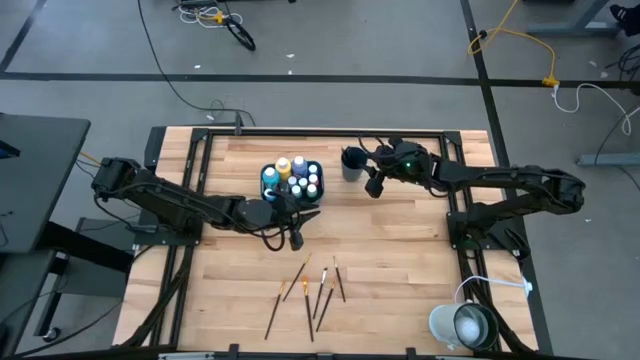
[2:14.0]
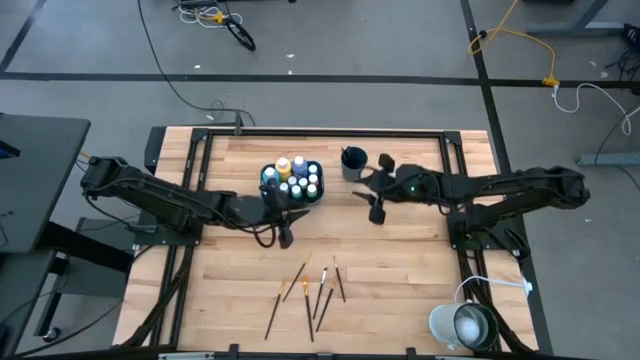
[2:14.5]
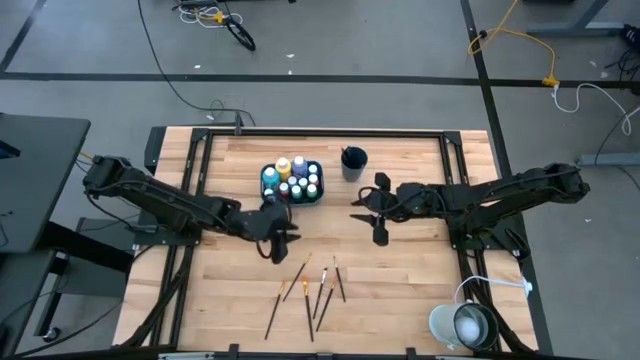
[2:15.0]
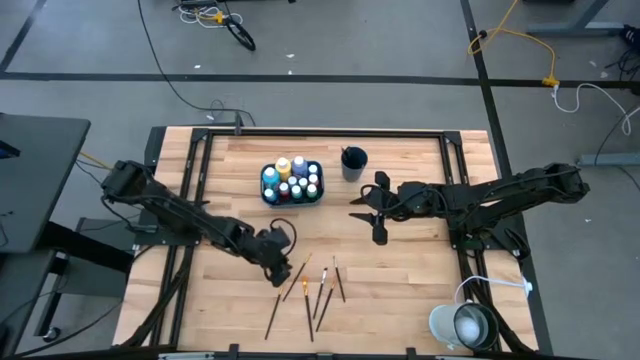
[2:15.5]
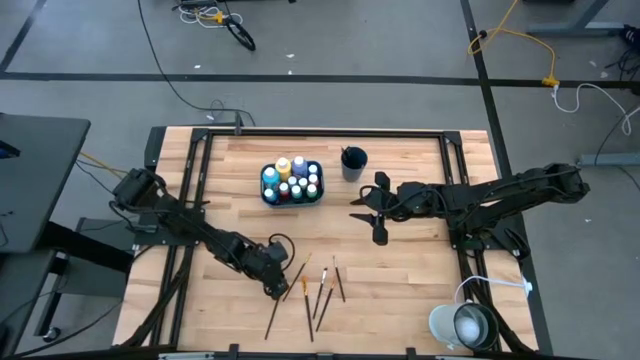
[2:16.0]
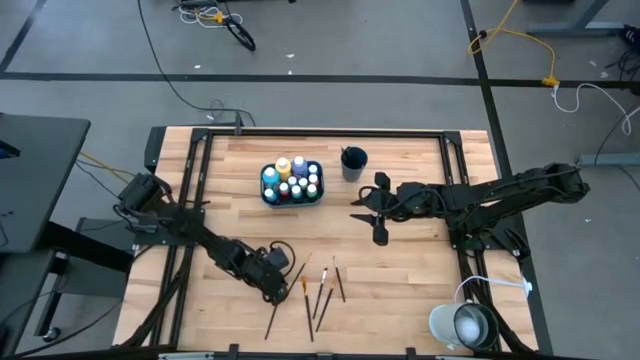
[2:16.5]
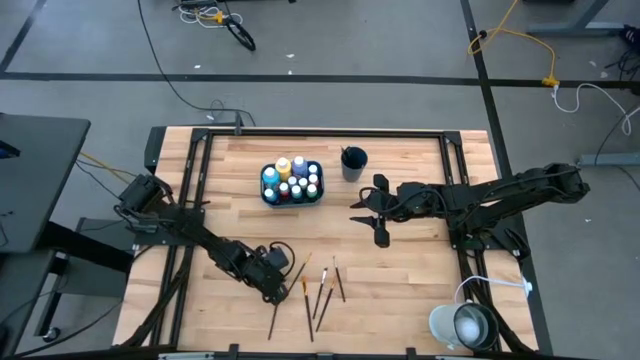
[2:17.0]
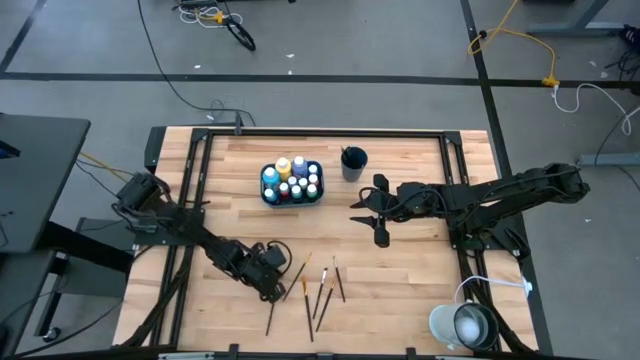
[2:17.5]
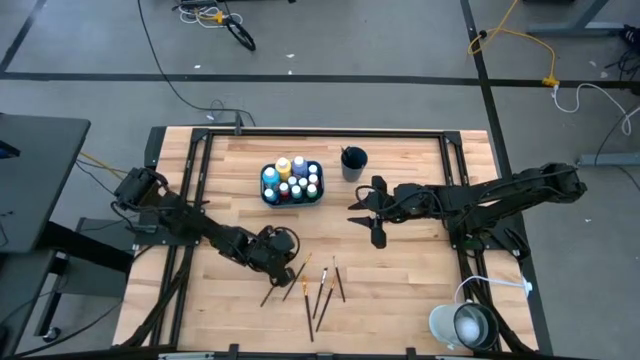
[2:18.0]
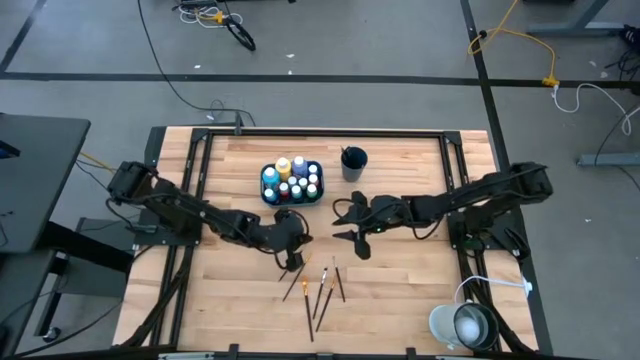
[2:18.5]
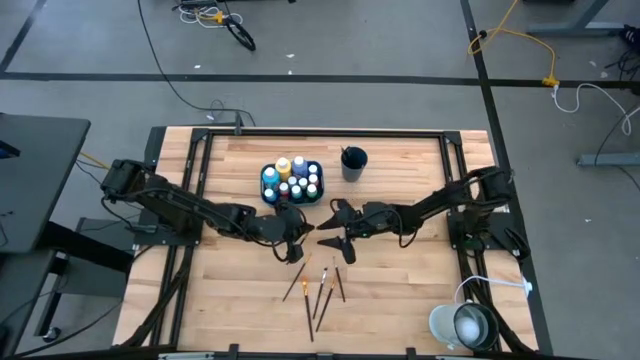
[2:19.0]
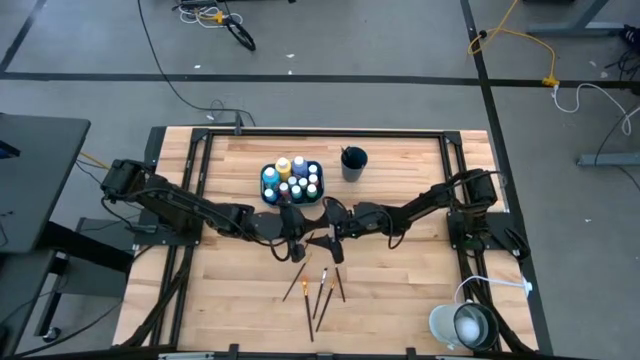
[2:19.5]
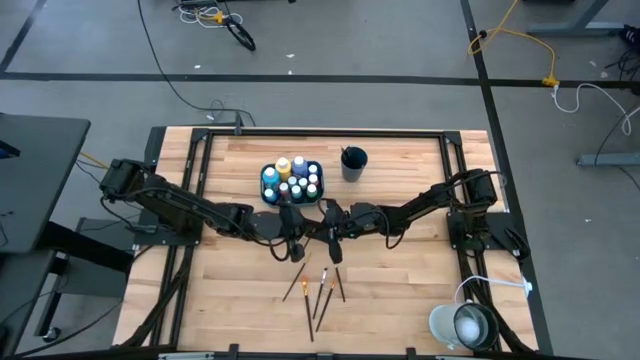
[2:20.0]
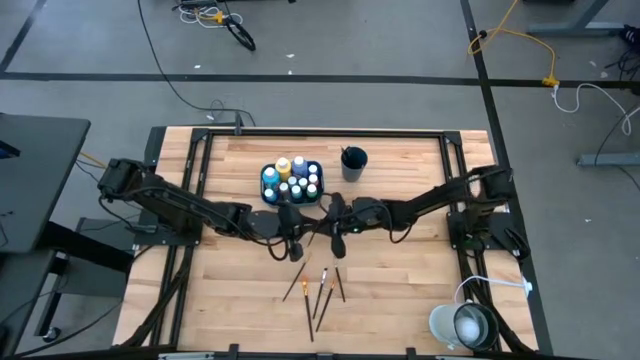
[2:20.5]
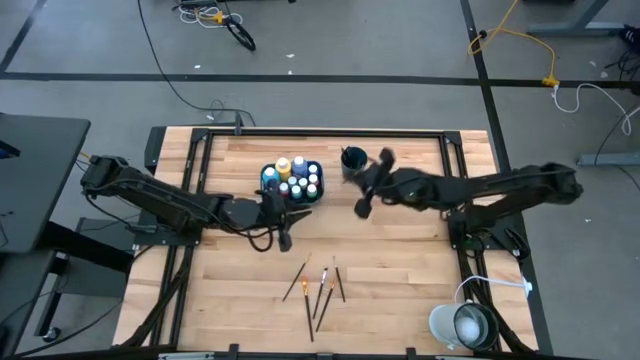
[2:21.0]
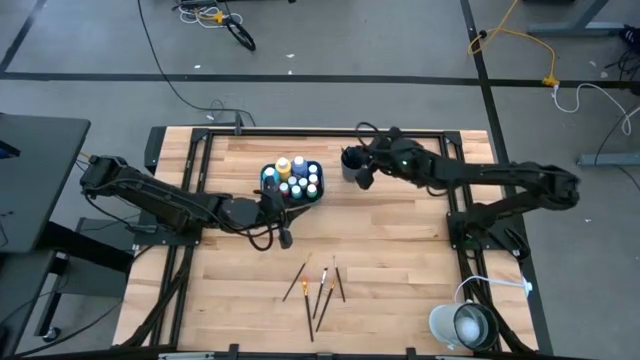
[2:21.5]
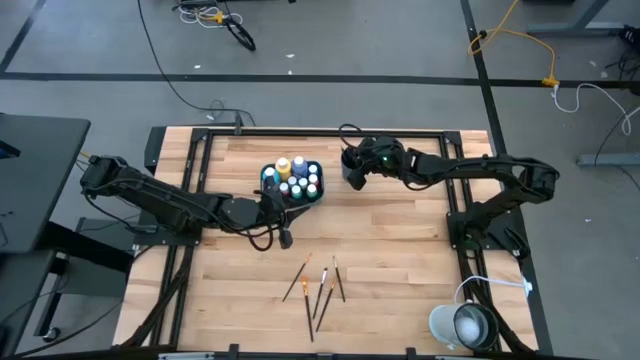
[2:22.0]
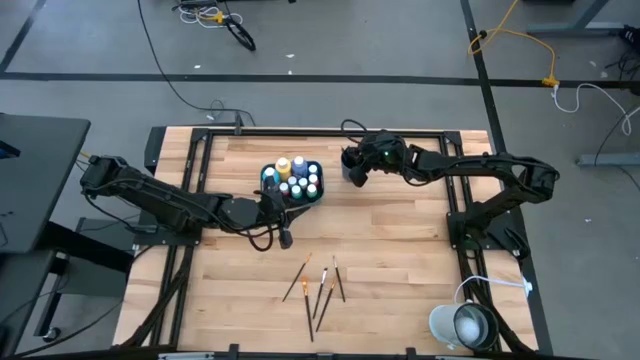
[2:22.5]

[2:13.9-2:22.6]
Task: Pick & Place Paint Supplies
Put the gold paint brush into the blue cup

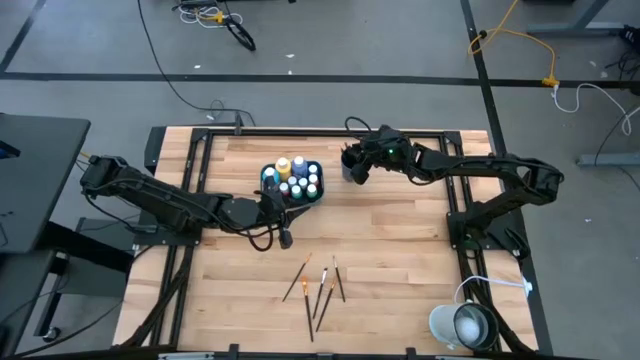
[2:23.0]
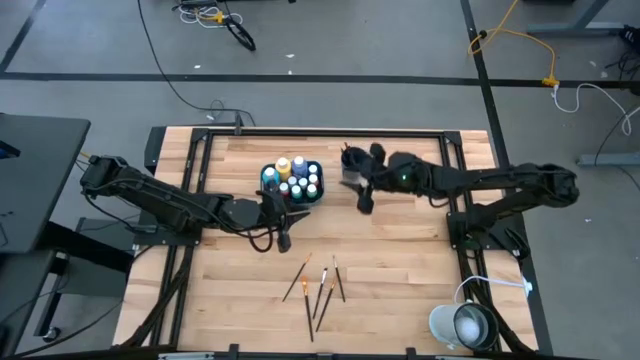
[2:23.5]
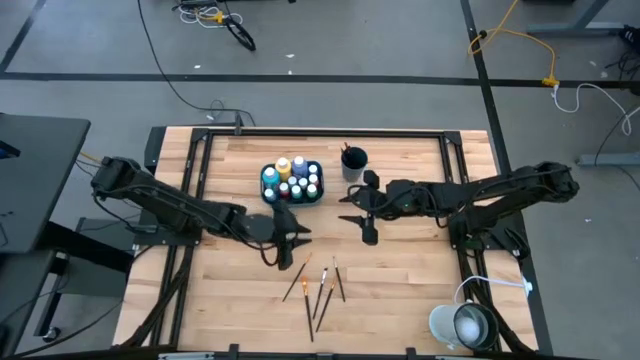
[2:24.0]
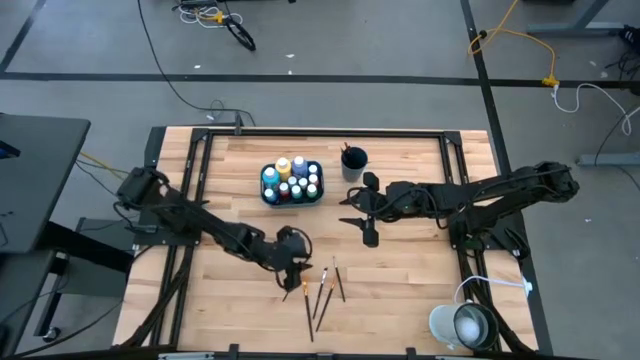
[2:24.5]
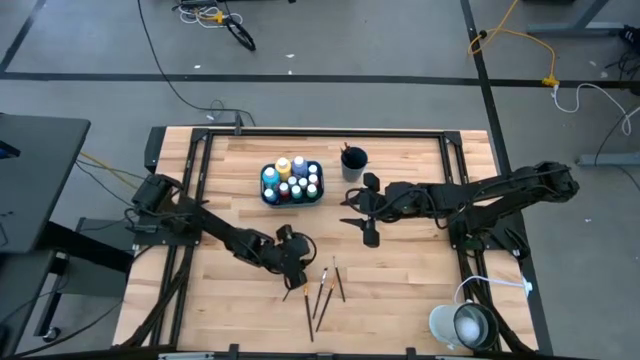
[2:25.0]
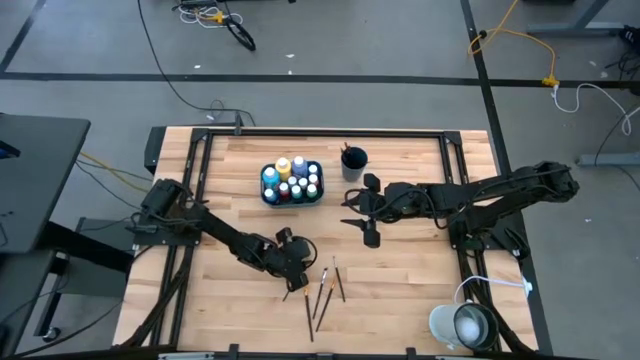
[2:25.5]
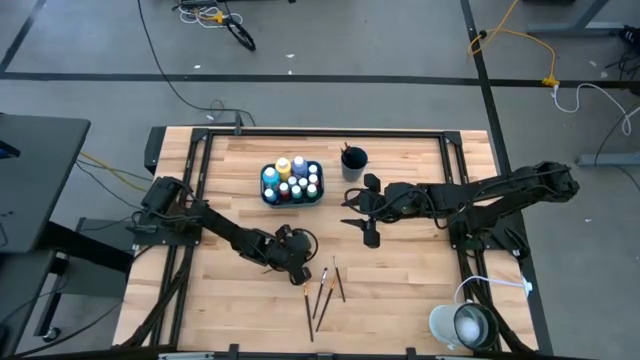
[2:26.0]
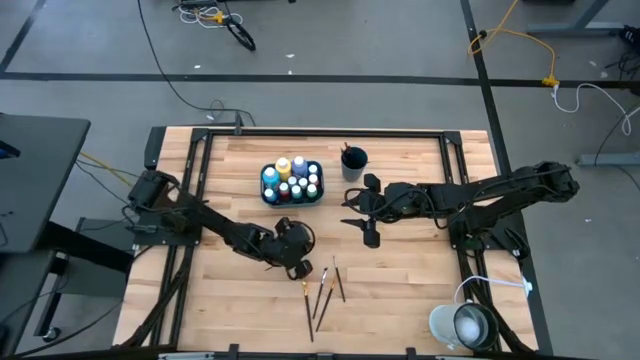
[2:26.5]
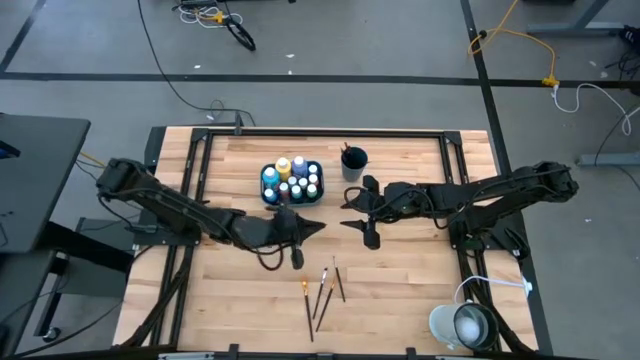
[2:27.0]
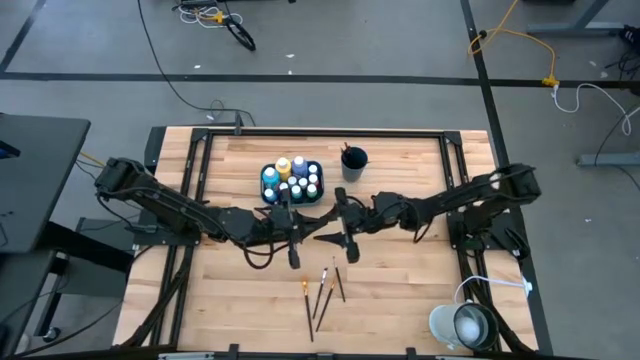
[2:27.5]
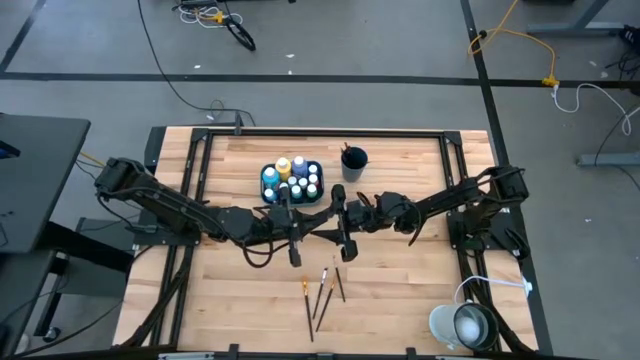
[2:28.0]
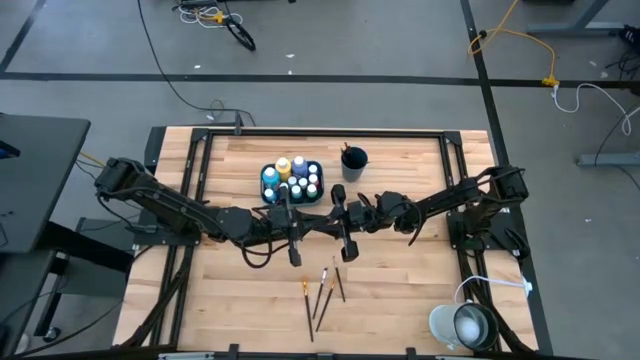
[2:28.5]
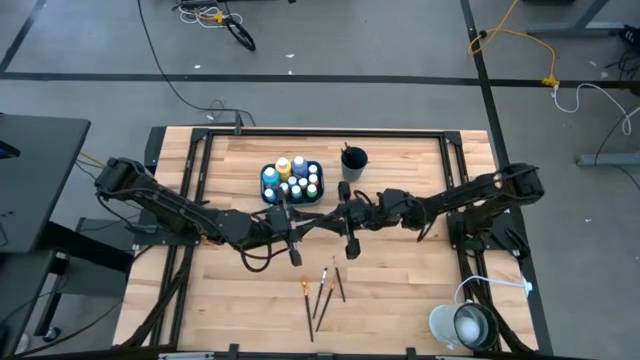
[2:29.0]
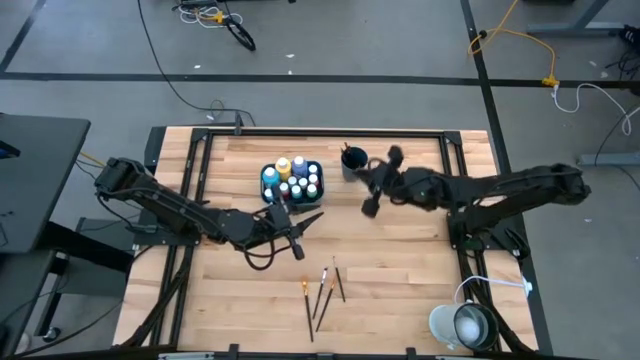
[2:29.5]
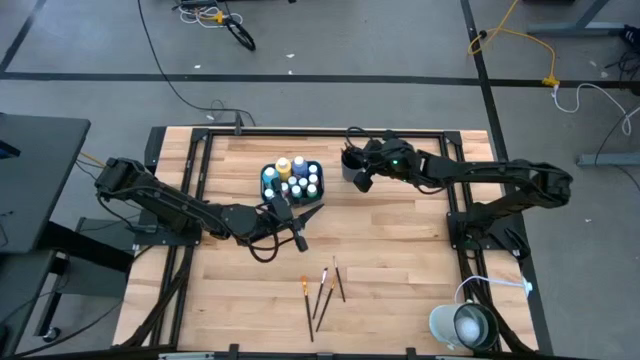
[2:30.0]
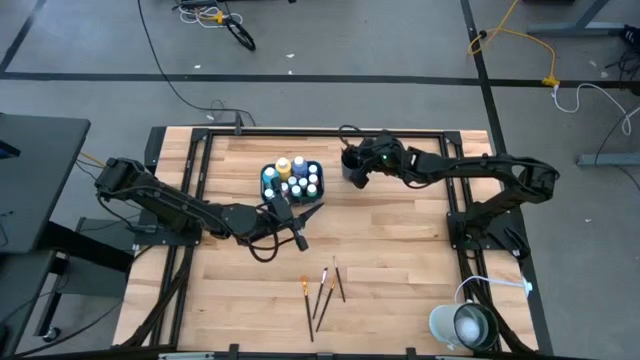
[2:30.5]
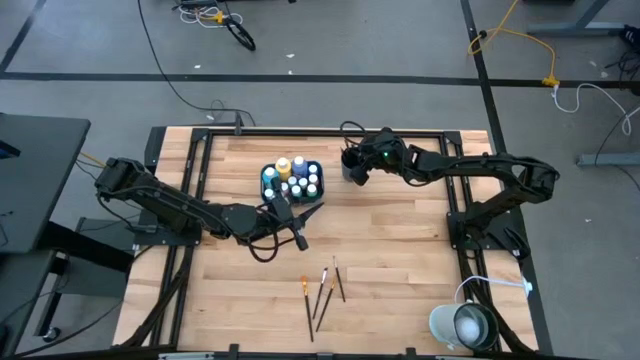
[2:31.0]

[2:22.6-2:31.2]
Put the gold paint brush into the blue cup

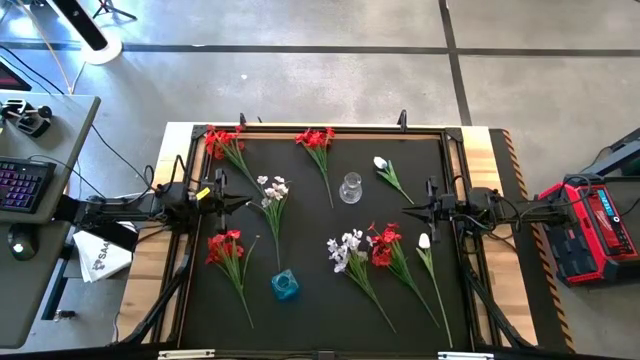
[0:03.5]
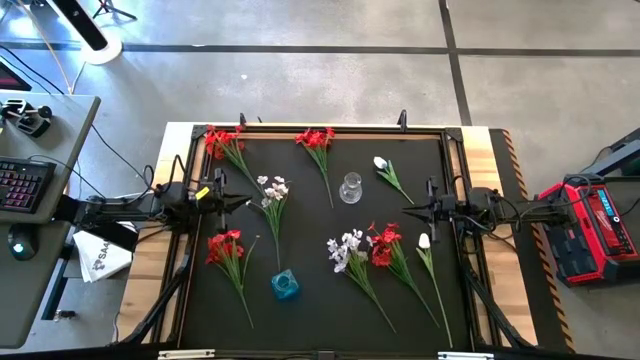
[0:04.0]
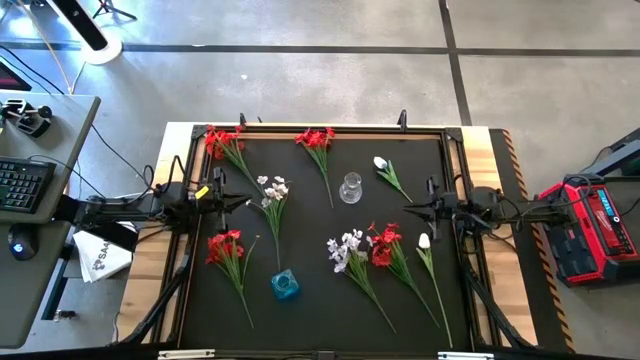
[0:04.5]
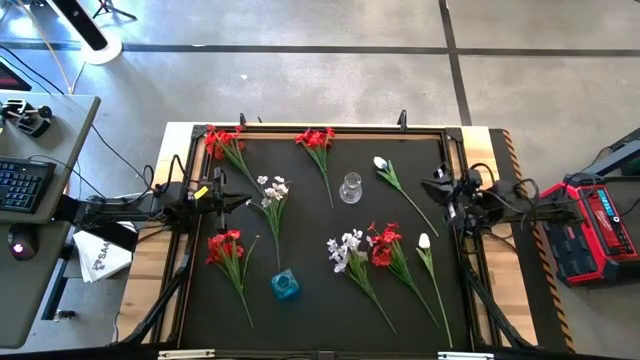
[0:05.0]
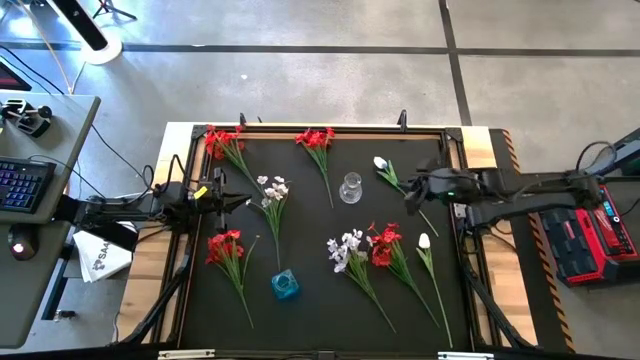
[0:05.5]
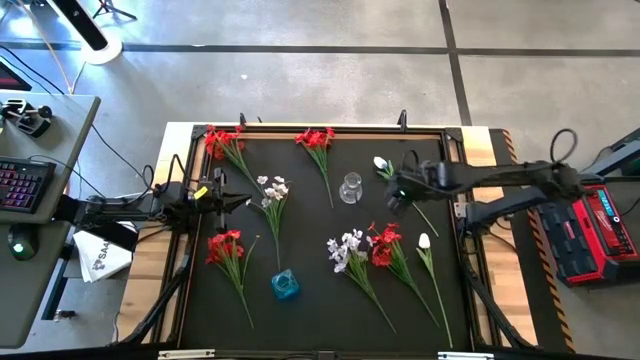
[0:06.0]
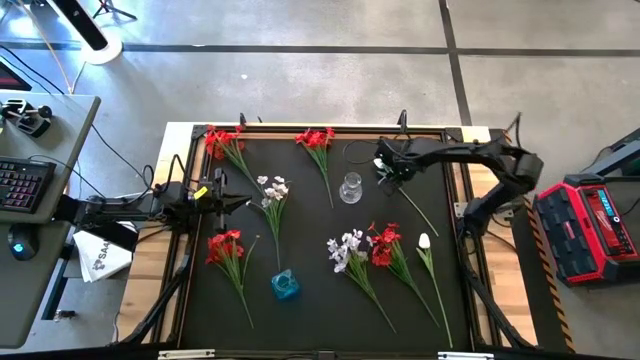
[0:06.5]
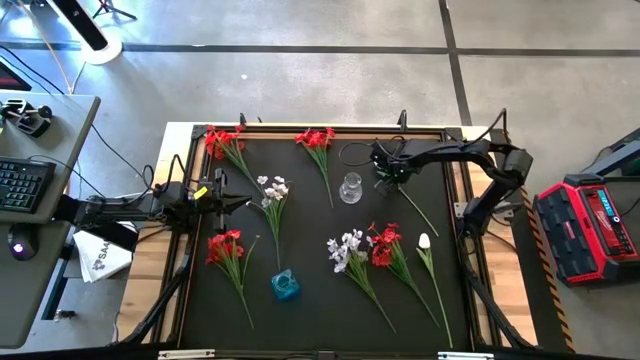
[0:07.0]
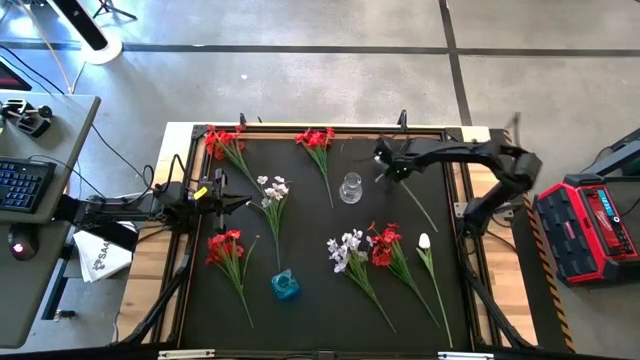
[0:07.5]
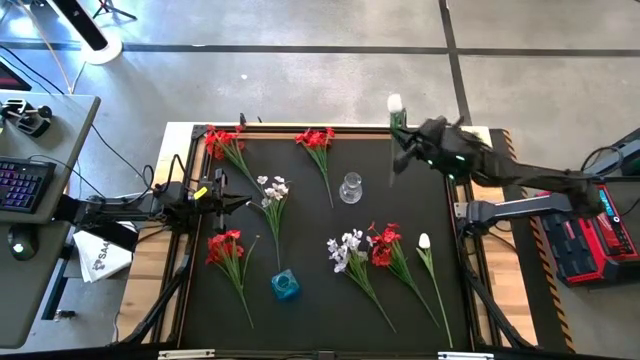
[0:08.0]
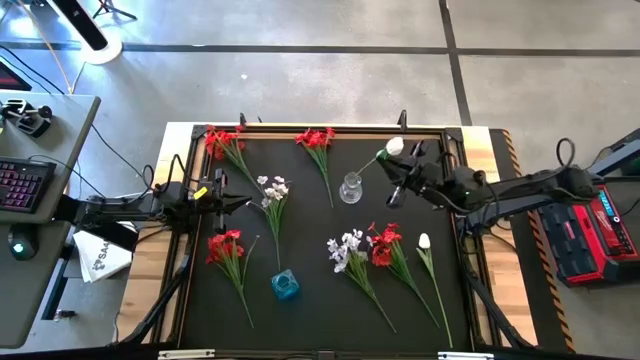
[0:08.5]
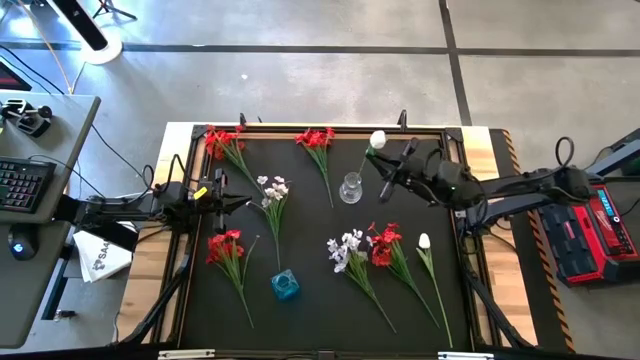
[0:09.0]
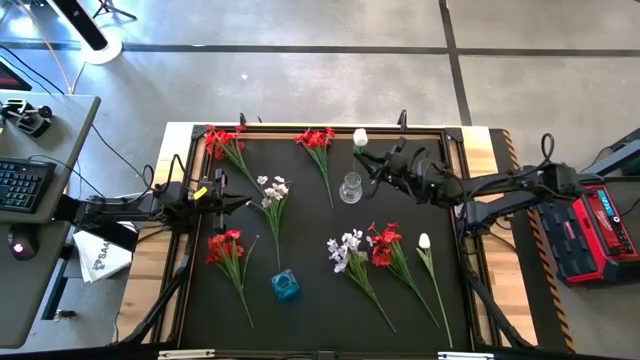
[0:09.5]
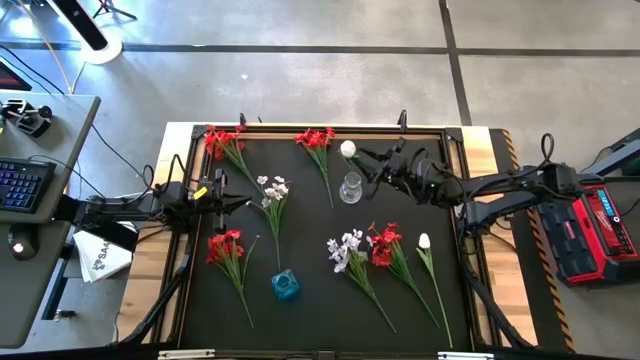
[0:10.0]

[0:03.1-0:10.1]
Task: Sort flowers into vase by color
Put the white tulip into the transparent vase
